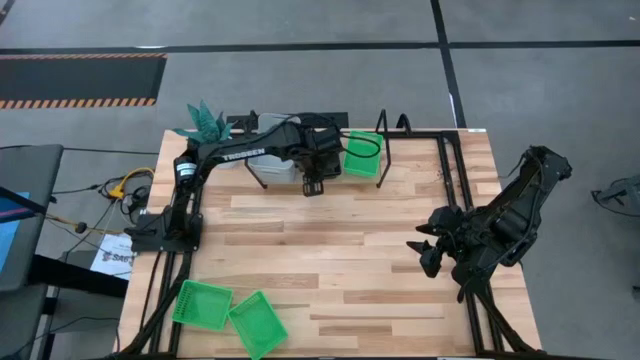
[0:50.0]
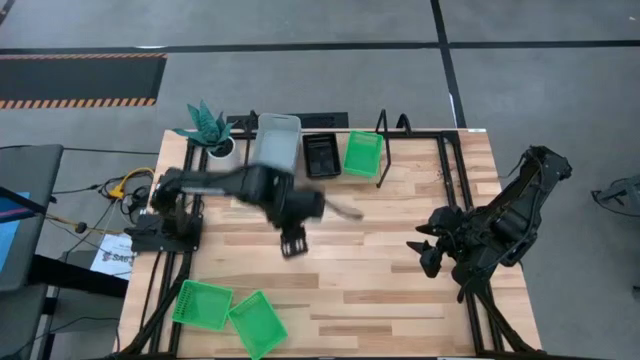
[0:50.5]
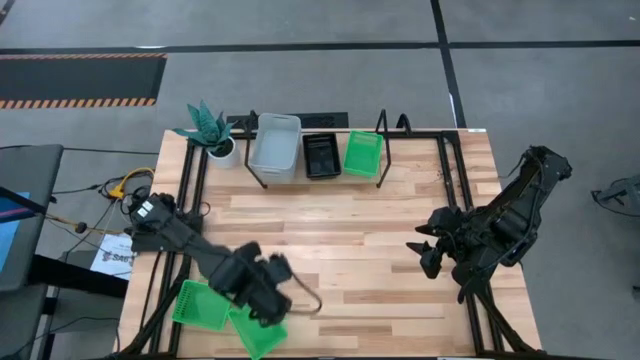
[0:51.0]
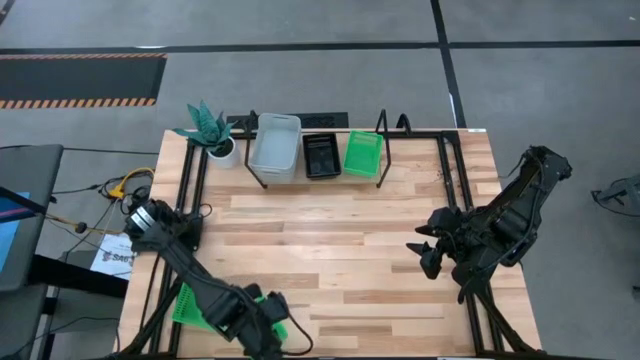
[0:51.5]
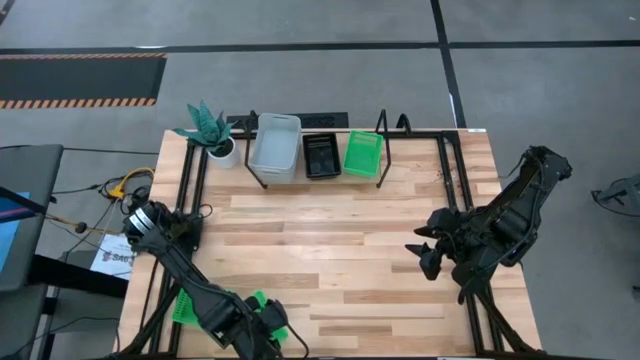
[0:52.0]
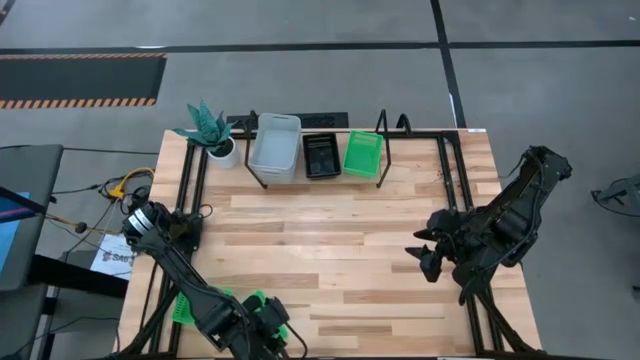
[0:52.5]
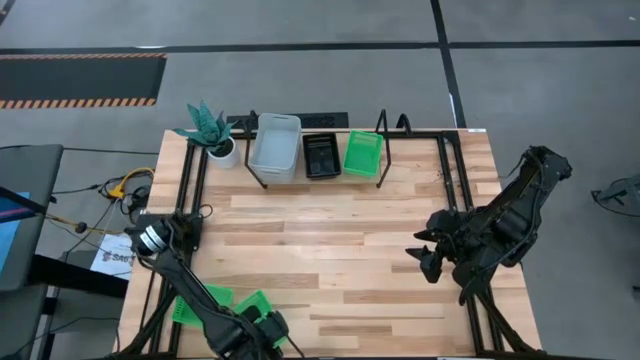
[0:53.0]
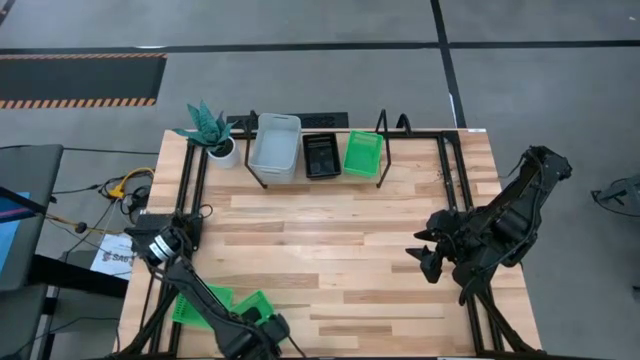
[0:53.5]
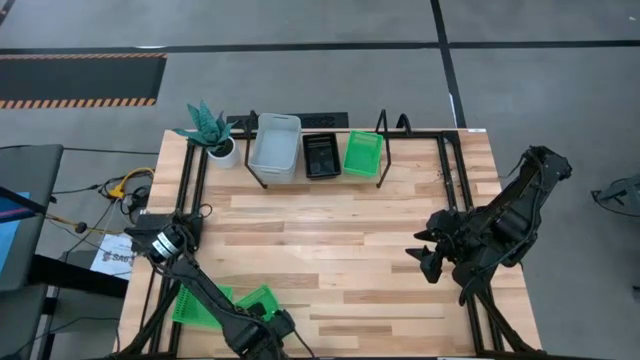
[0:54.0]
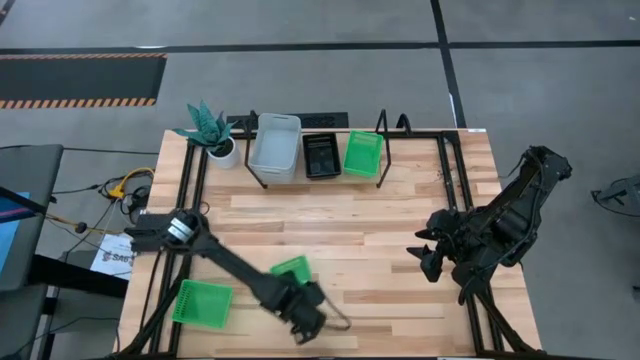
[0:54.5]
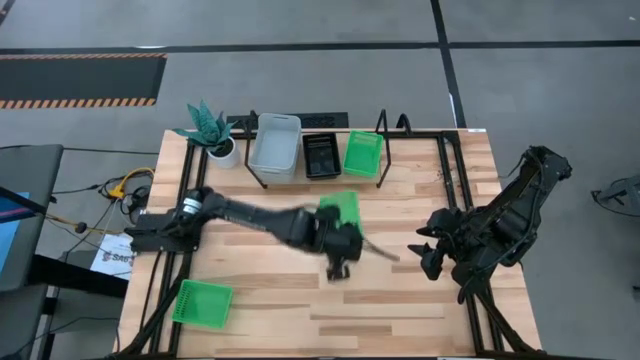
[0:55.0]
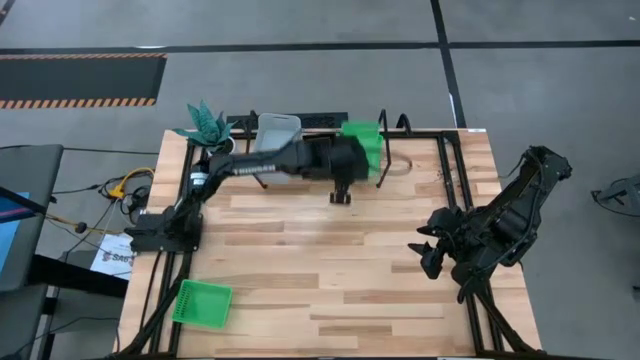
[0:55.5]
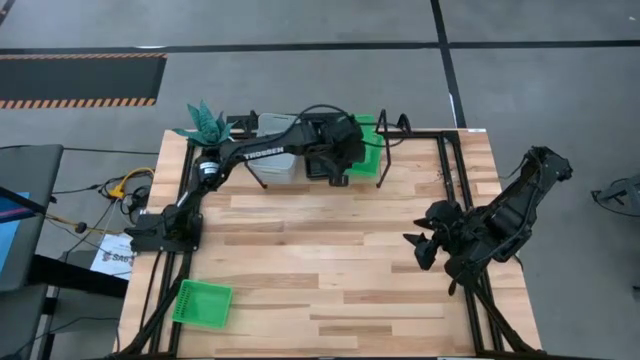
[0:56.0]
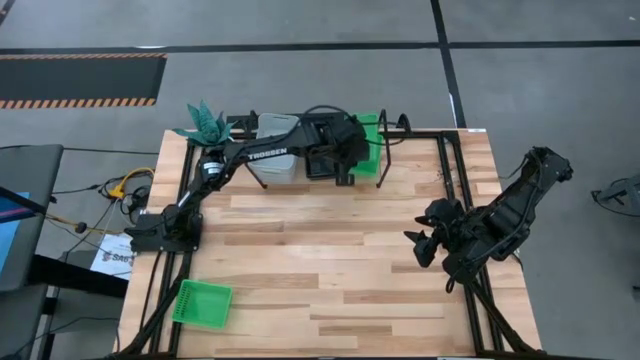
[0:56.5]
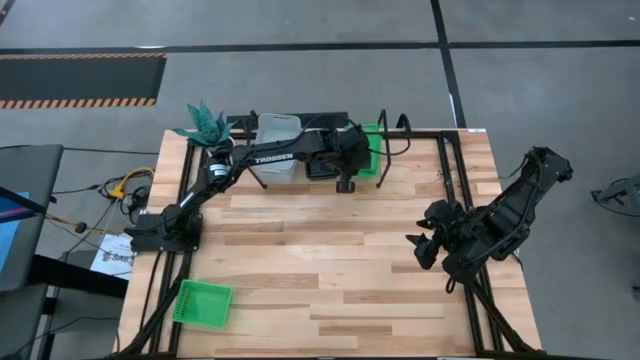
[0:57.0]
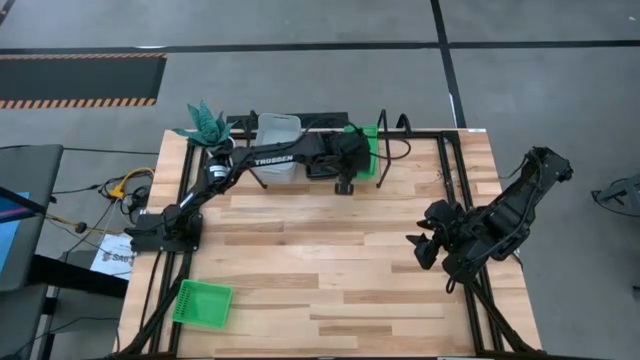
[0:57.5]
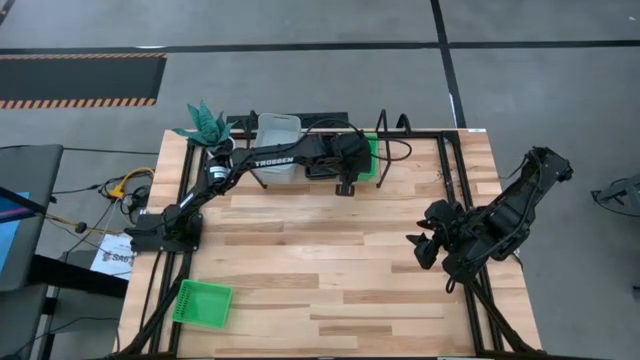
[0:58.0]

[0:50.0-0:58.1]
Task: Stack baskets on shelf by color
Stack the right green bin on top of the green bin on the shelf

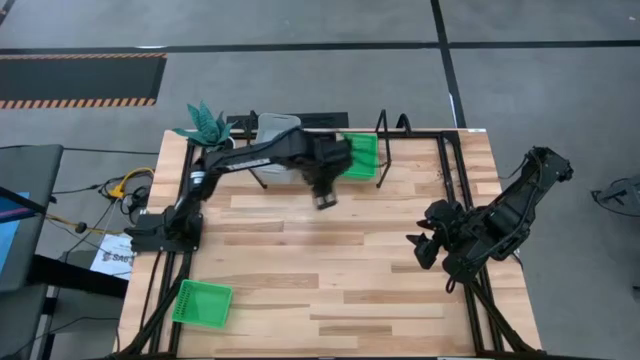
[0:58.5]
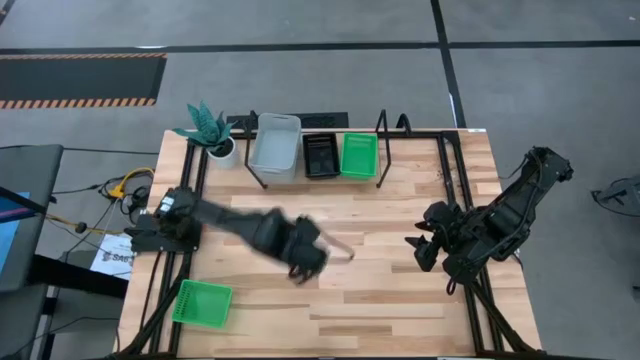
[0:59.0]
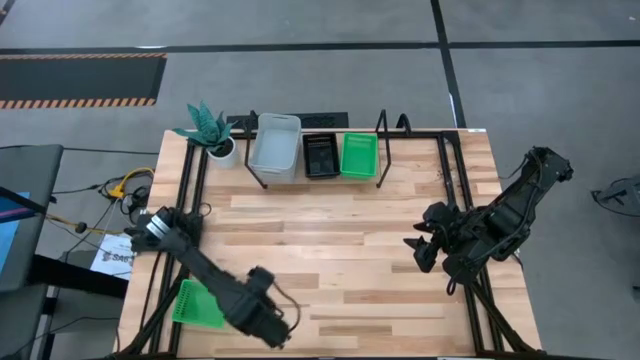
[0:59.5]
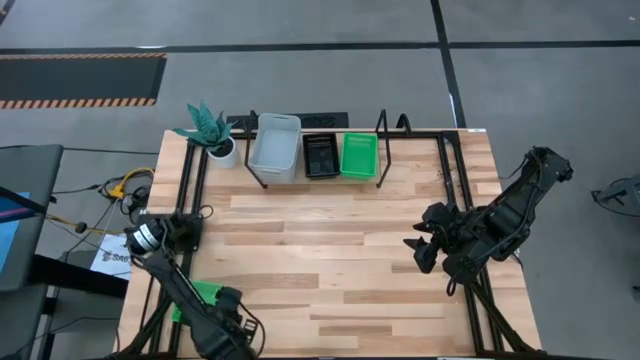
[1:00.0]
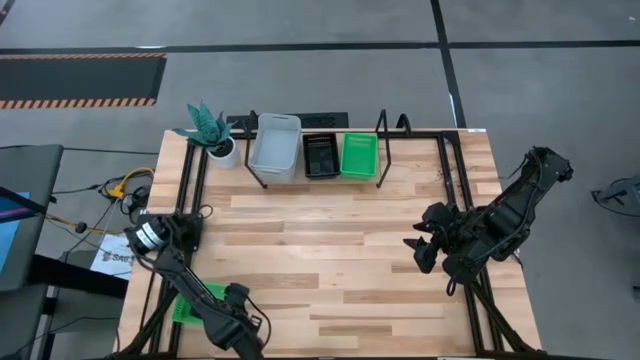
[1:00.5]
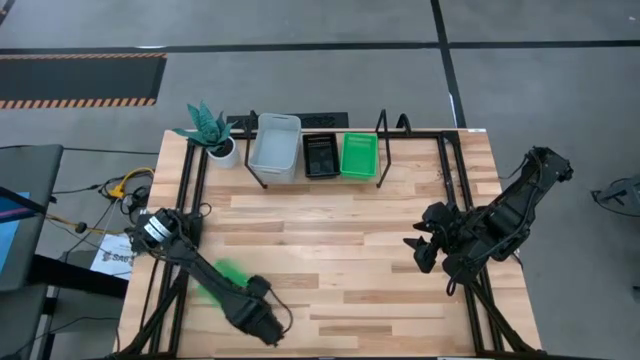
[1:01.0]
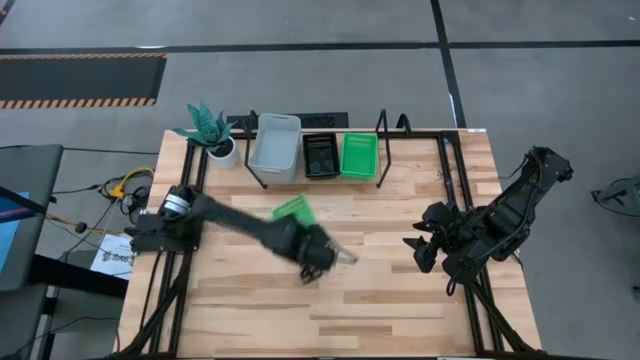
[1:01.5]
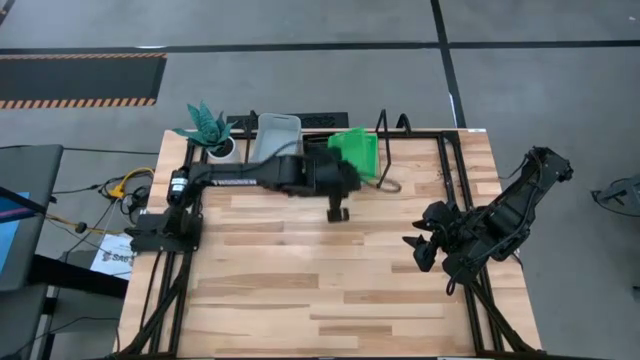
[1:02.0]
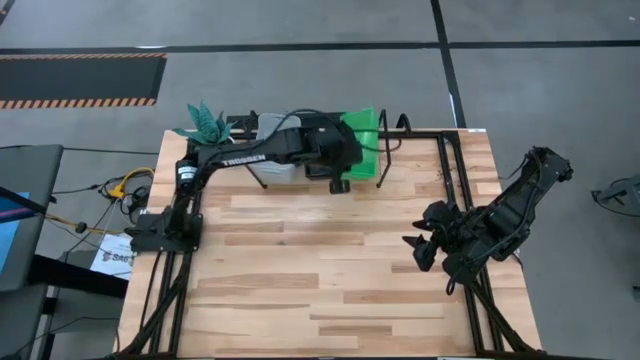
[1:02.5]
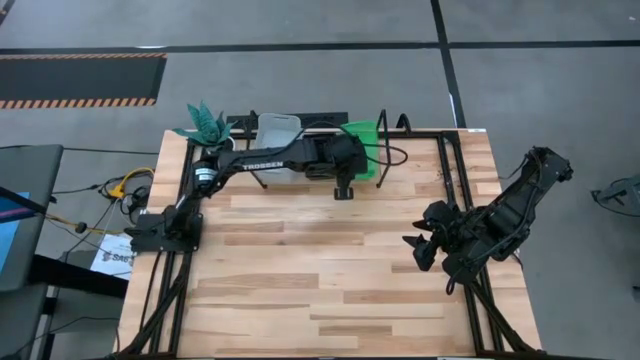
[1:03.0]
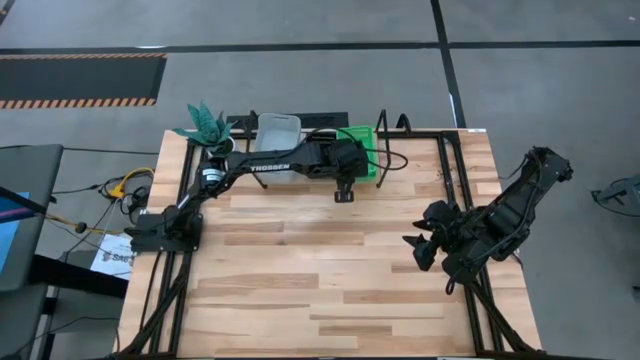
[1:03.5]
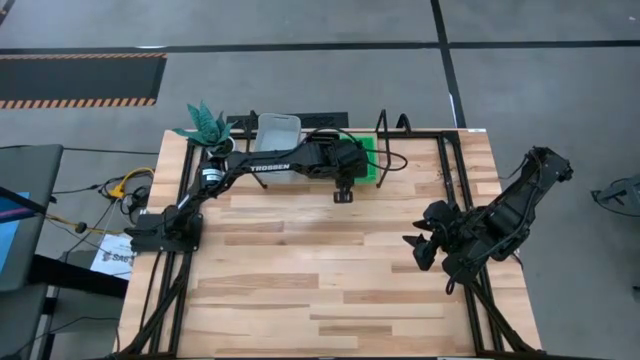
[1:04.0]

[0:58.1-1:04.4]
Stack the green bin on top of the green bin on the shelf

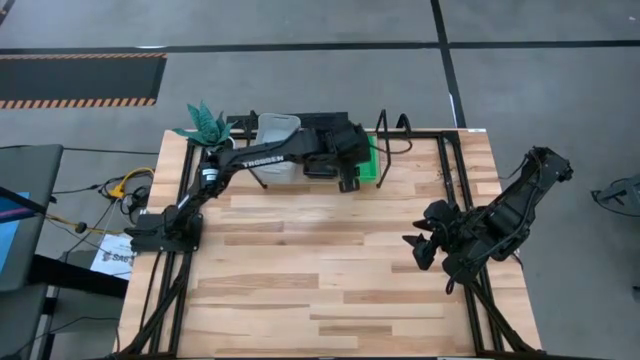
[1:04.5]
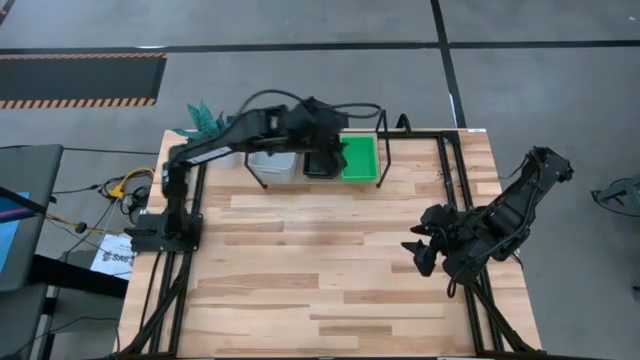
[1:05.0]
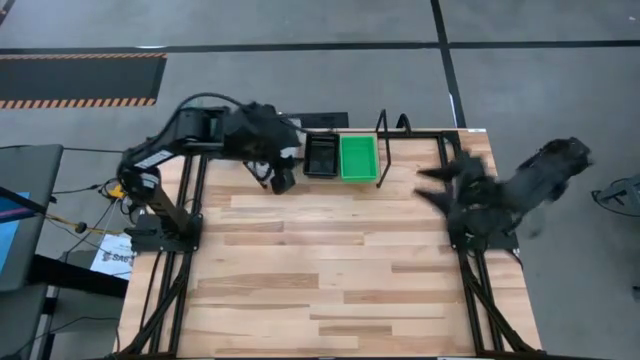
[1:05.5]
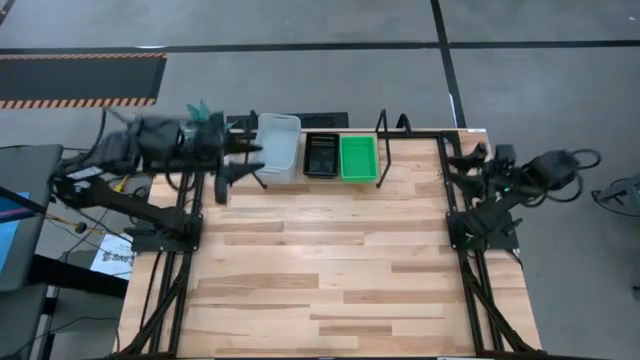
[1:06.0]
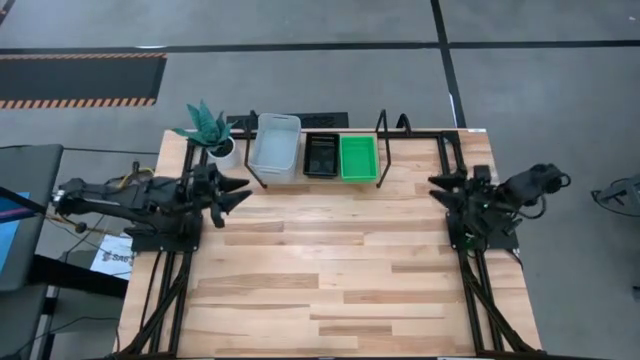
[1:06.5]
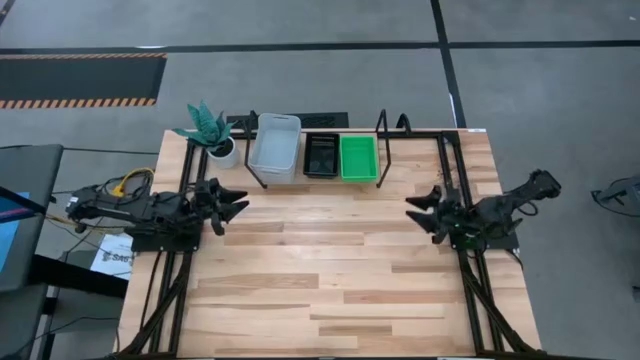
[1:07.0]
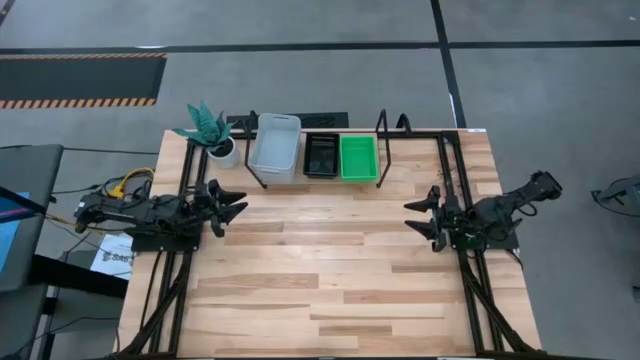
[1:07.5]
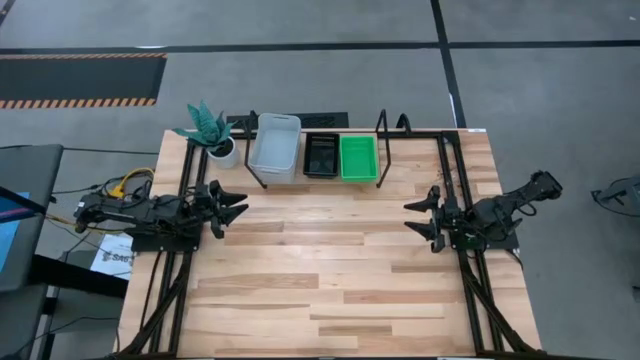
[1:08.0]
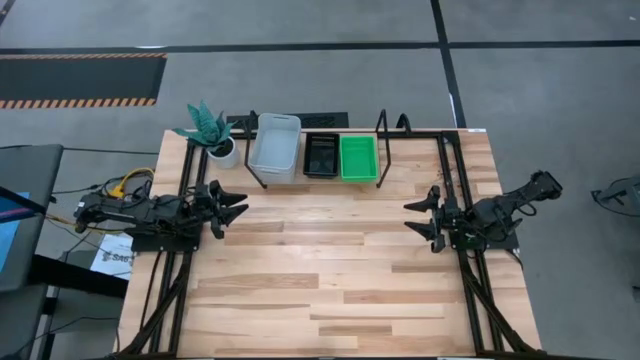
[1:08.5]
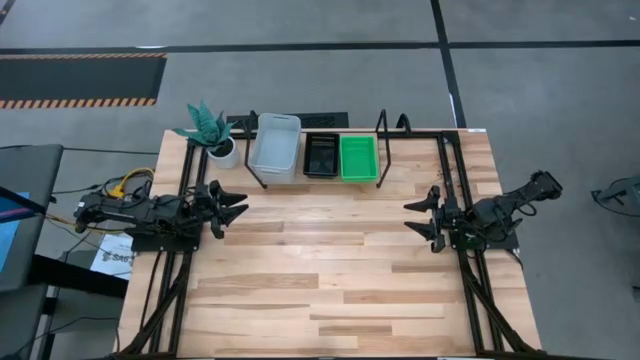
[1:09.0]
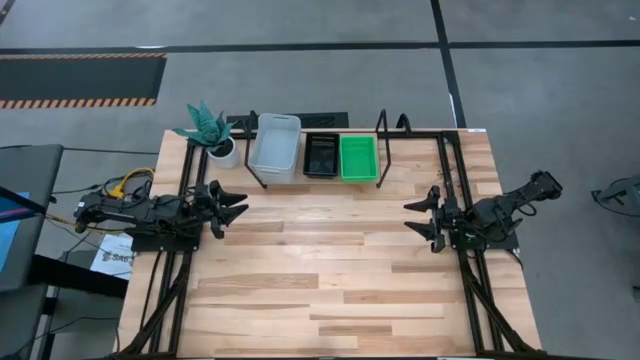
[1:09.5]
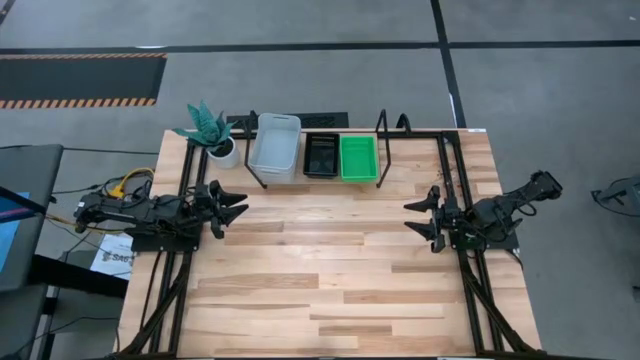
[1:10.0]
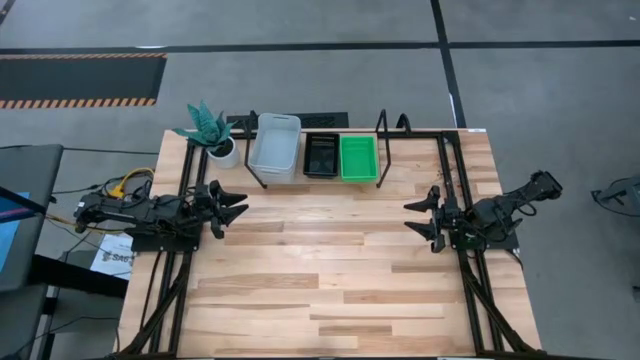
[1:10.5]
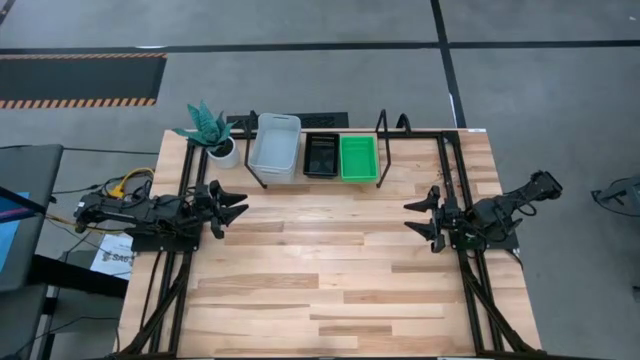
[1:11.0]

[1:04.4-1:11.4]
Return to Home Position
